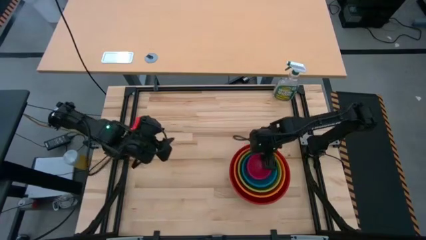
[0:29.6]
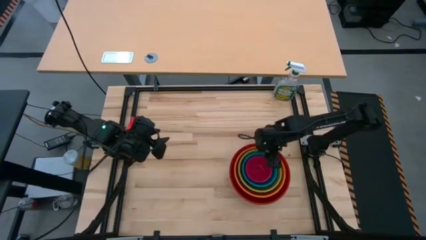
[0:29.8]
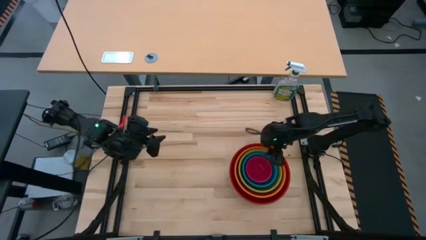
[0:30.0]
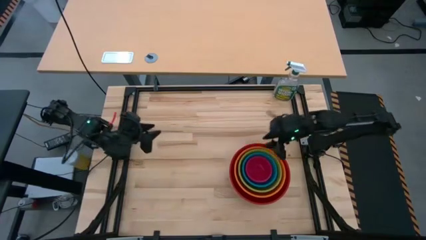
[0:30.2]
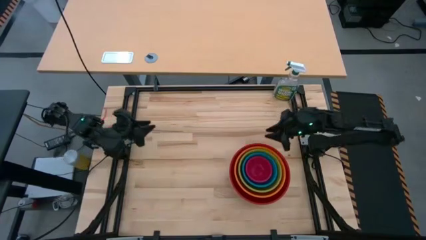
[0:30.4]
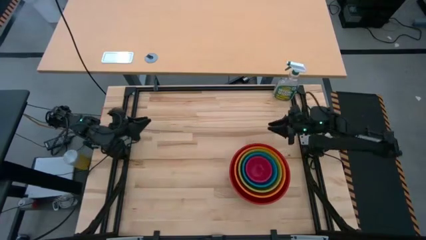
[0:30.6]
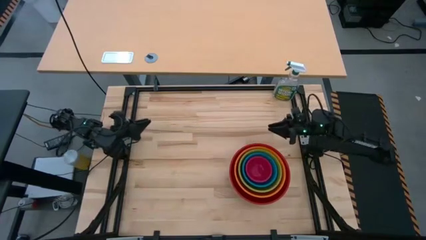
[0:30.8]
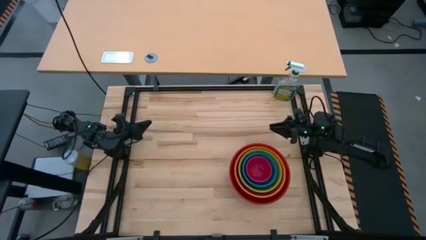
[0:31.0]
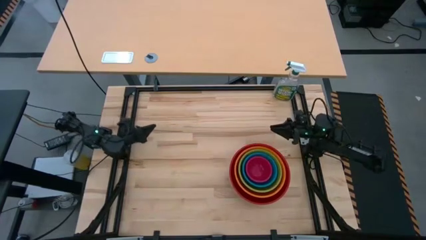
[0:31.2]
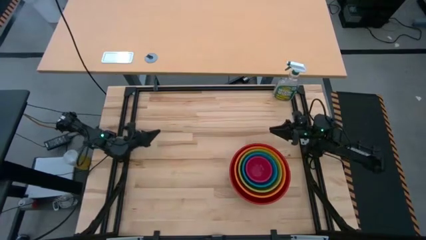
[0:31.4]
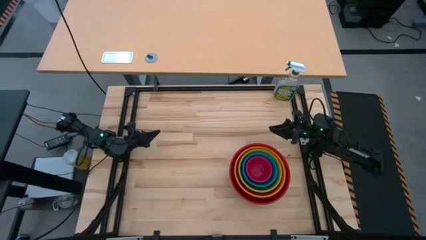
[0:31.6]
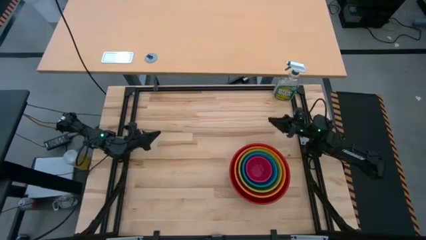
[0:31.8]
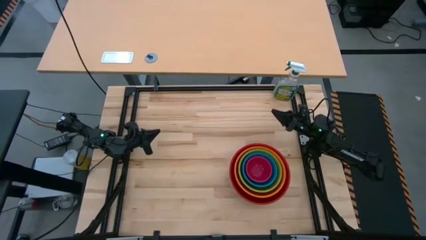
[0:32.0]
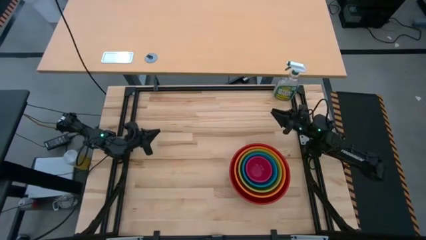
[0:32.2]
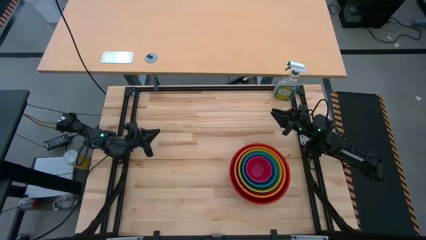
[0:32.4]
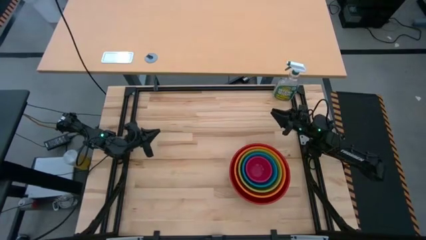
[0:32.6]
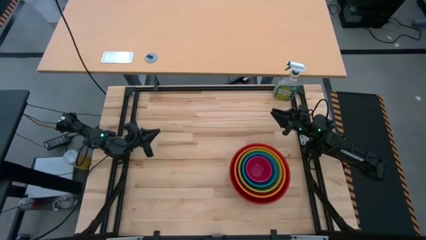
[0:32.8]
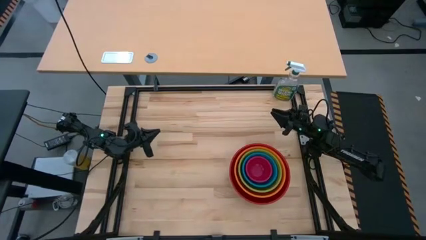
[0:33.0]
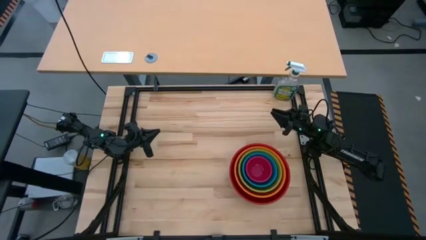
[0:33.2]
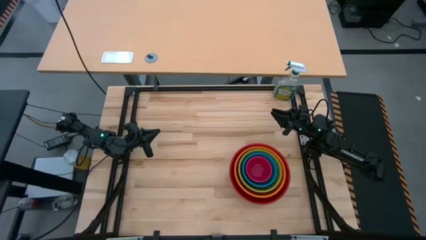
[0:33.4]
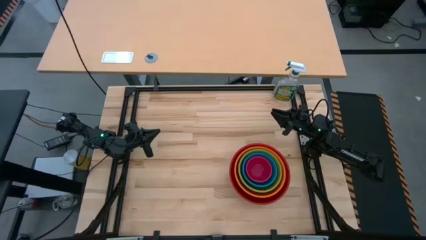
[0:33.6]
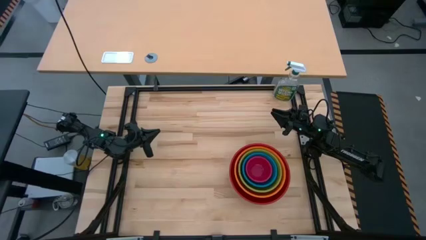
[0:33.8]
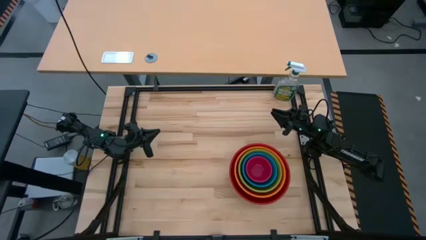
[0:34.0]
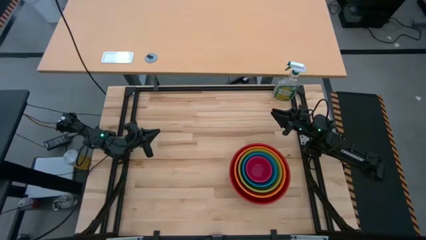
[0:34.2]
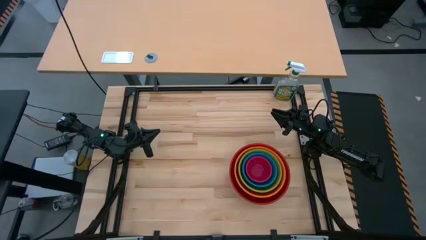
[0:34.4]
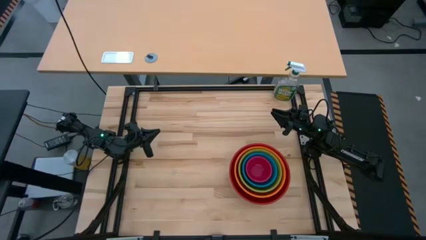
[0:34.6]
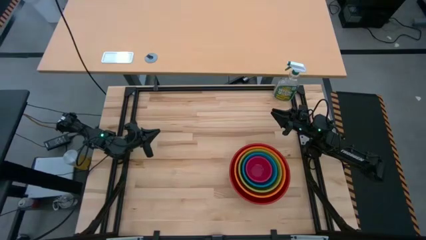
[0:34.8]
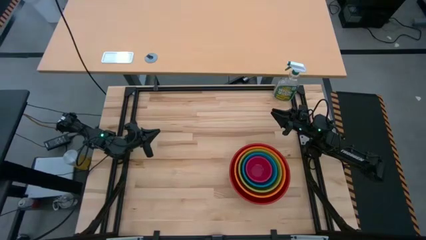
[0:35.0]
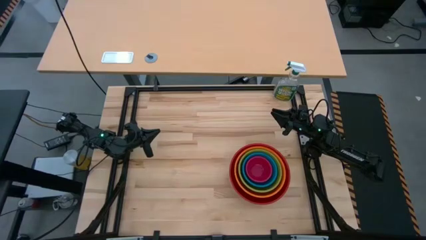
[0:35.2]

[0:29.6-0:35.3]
Return to Home Position
